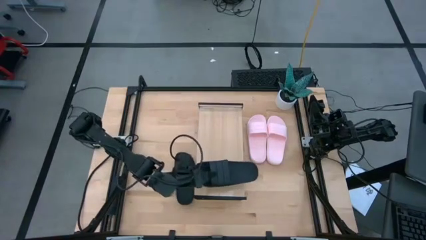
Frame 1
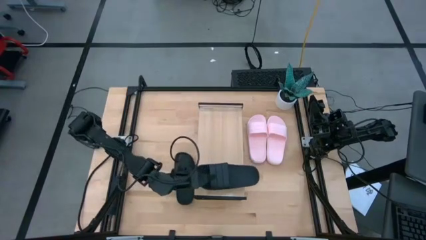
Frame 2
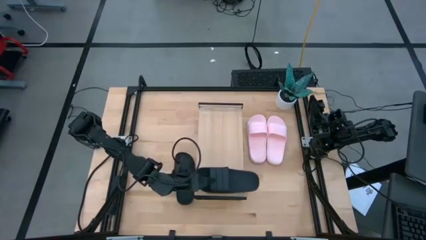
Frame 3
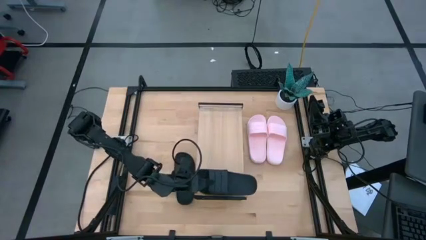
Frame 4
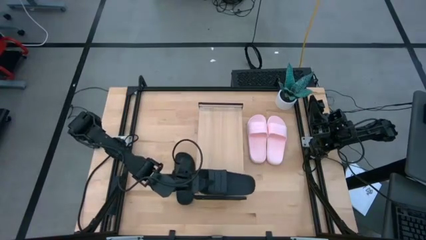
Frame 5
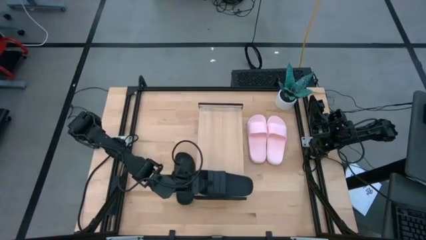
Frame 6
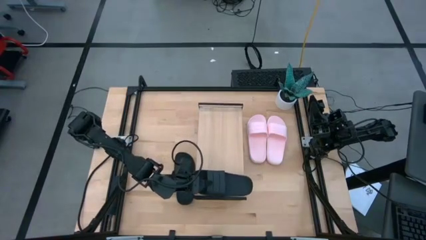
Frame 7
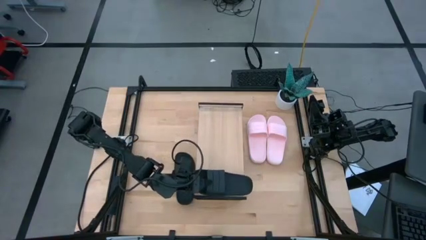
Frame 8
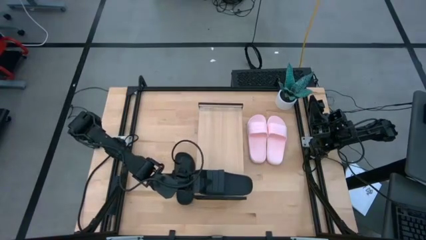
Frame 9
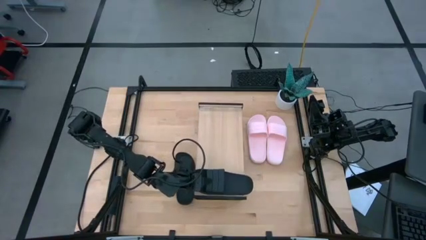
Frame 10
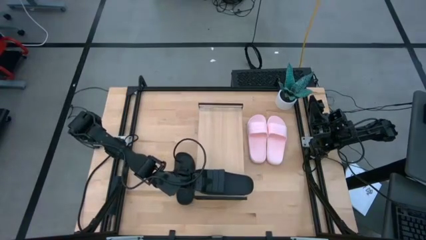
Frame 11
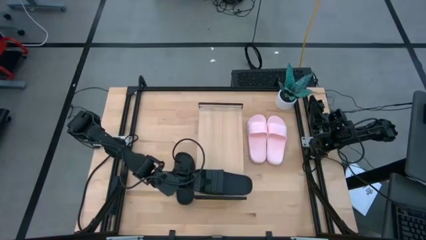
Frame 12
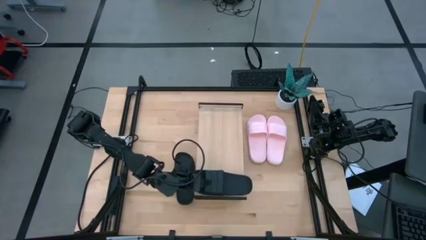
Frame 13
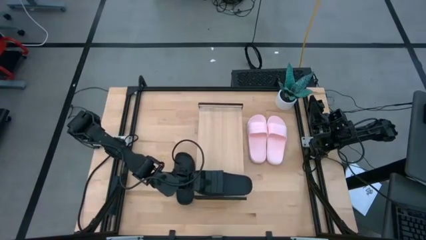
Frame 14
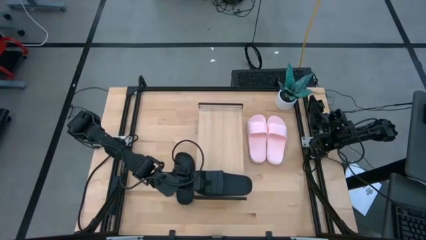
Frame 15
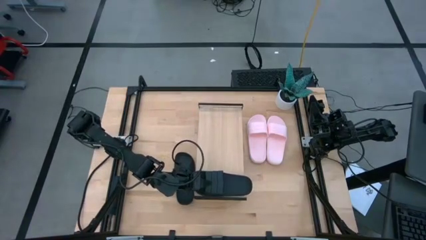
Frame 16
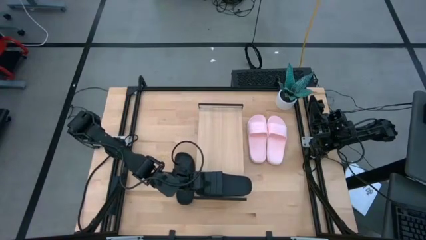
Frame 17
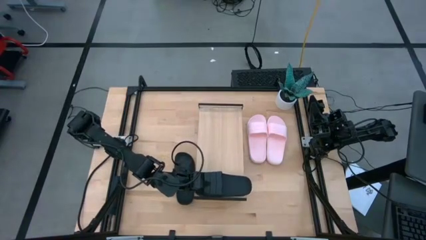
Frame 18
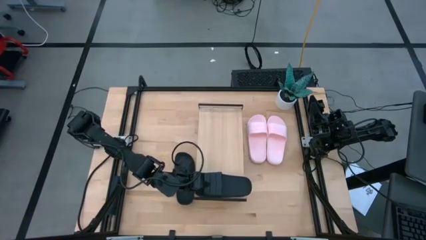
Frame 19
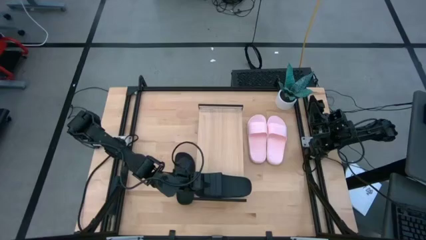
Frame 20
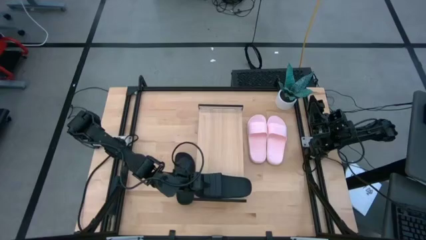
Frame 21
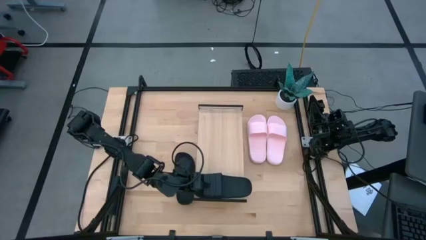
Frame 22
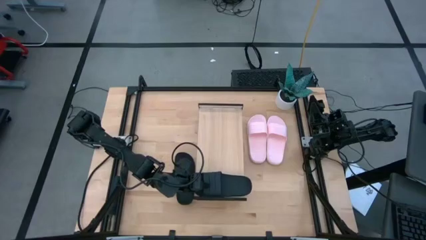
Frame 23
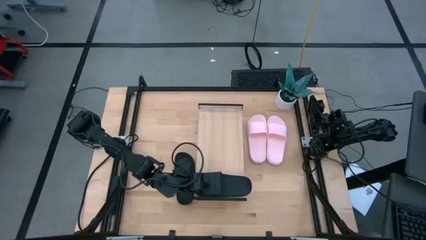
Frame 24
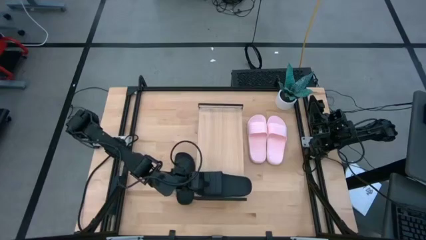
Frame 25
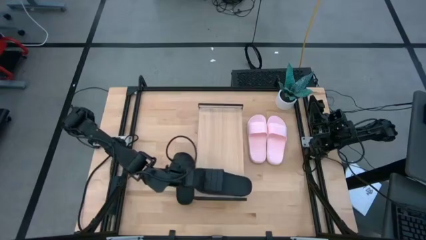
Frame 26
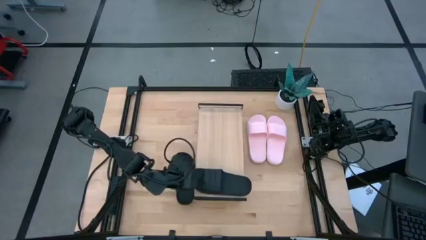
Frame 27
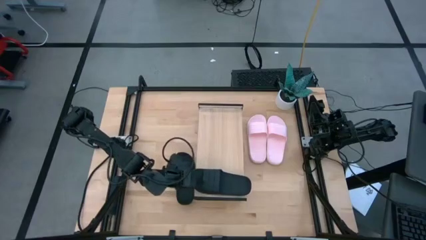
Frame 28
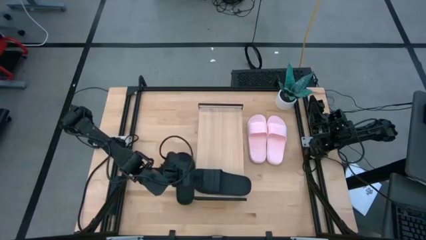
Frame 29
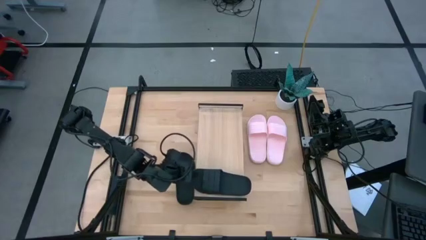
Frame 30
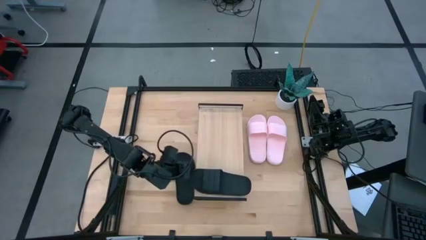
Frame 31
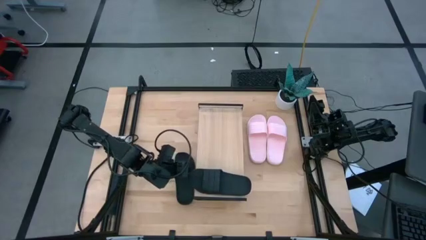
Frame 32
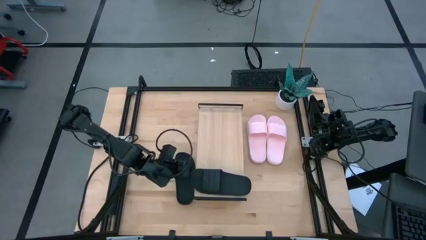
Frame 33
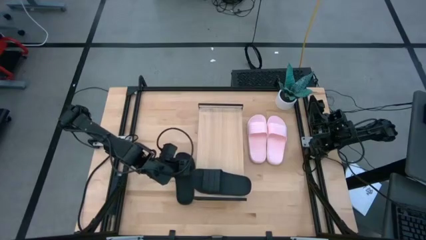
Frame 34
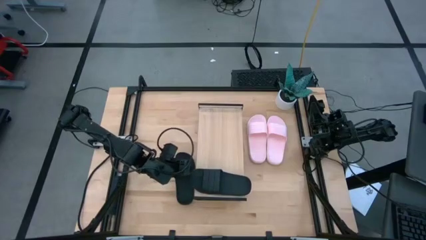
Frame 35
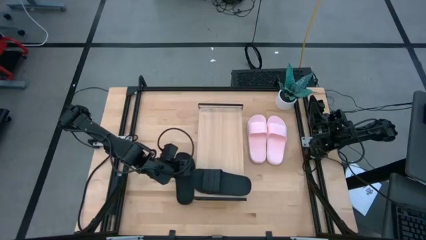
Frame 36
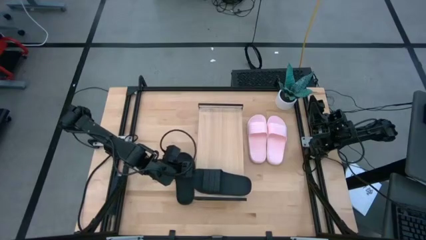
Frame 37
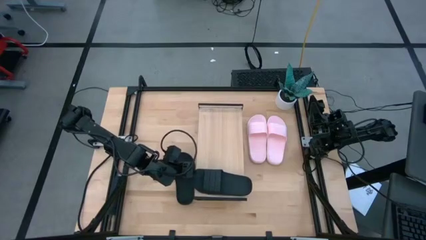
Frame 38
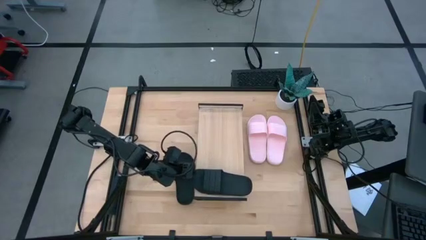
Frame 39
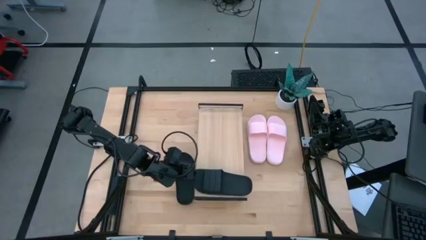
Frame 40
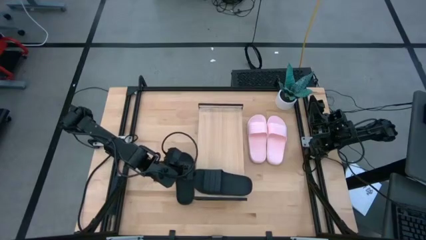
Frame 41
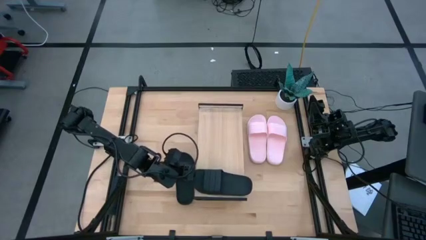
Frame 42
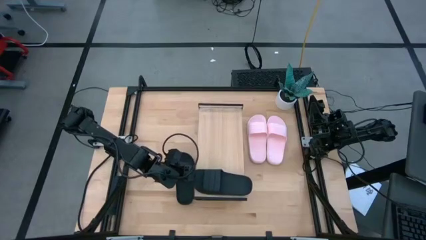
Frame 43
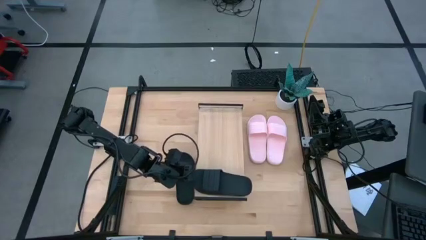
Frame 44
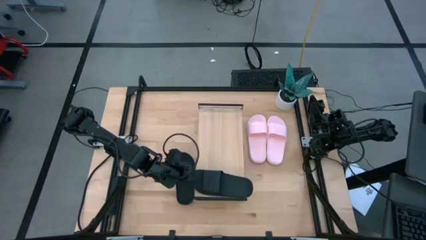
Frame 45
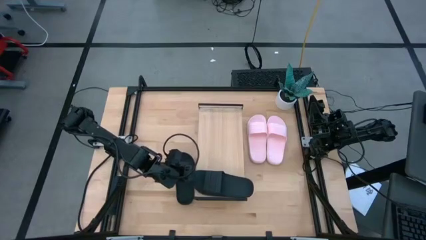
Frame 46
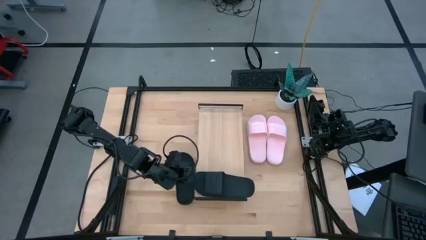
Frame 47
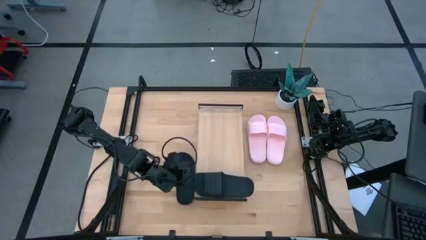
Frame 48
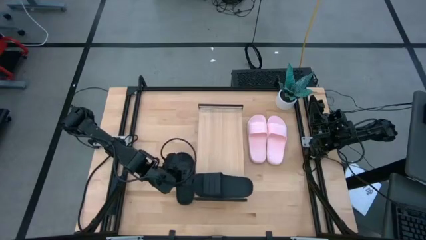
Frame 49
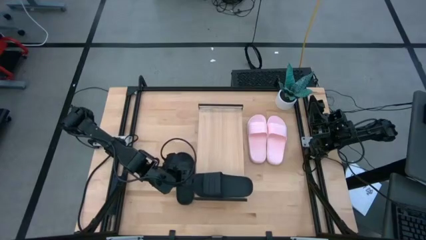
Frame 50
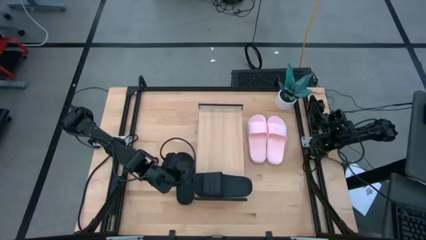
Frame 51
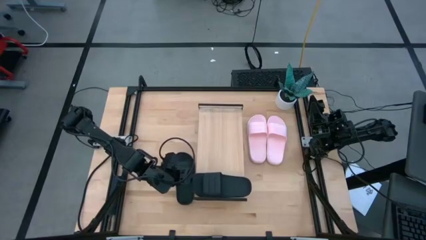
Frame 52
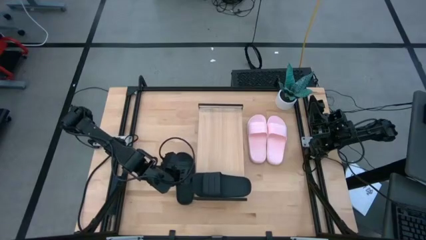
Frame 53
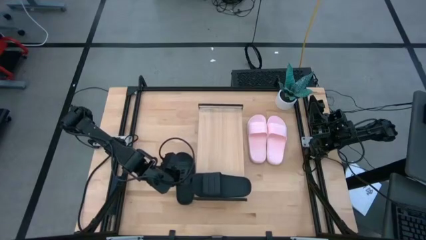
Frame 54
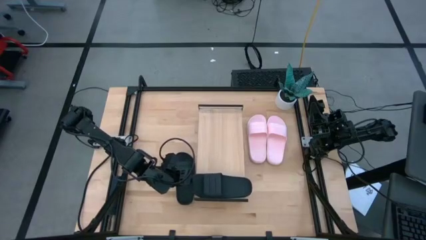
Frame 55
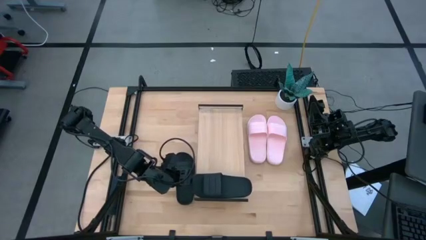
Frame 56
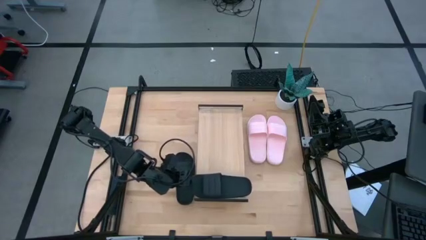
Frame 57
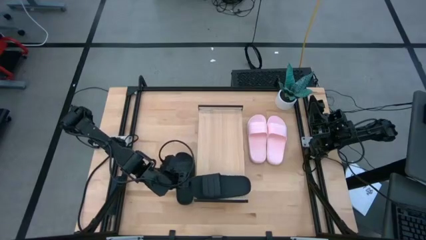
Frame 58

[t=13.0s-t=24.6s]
Task: Pick and place slides into the shelf
Put the left black slides on the shelf

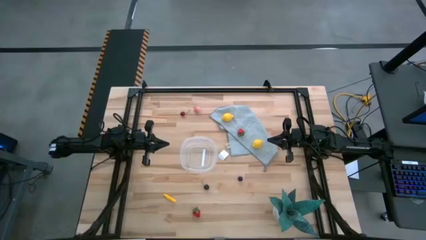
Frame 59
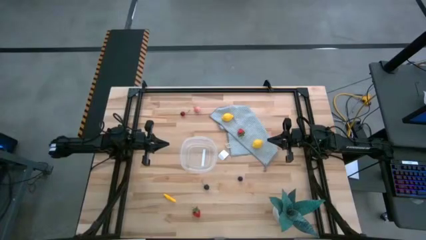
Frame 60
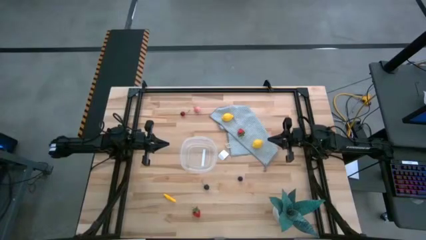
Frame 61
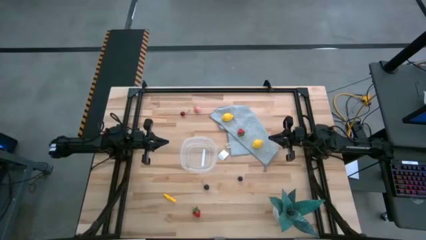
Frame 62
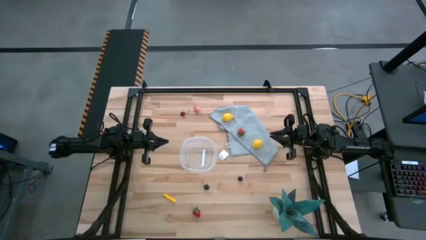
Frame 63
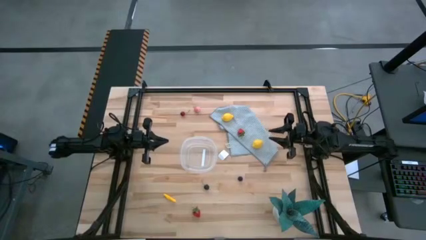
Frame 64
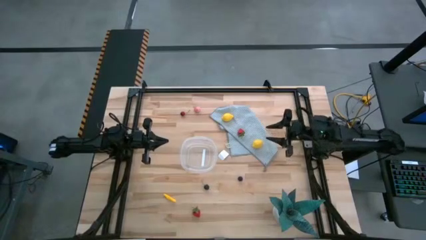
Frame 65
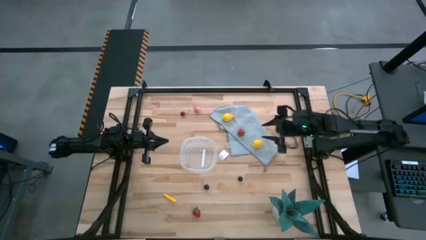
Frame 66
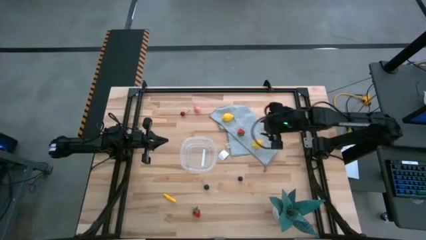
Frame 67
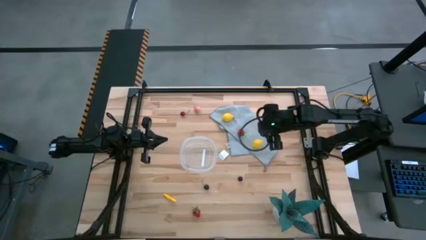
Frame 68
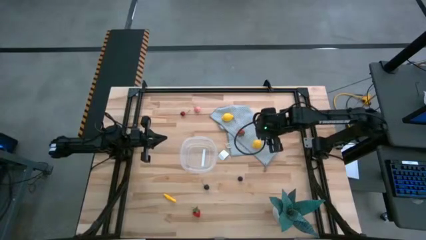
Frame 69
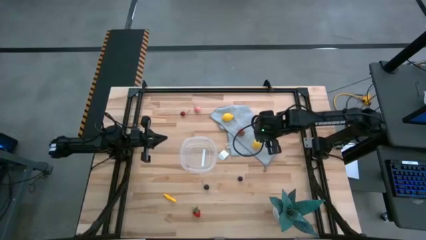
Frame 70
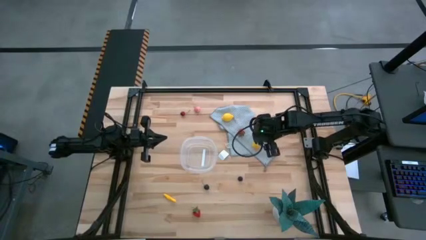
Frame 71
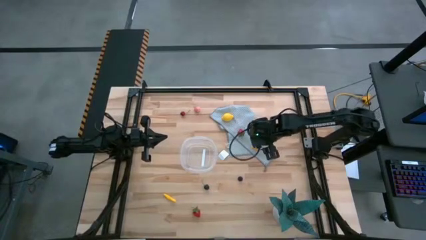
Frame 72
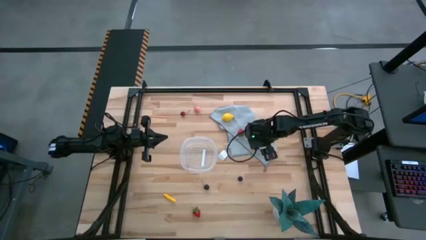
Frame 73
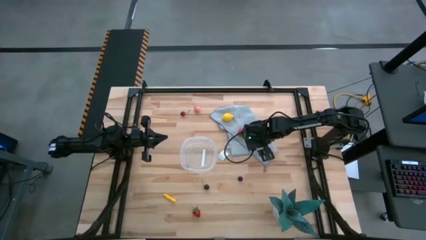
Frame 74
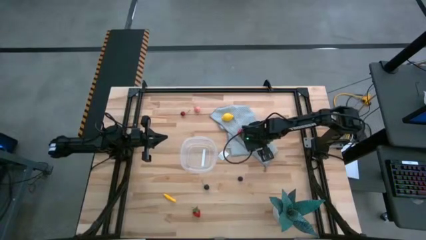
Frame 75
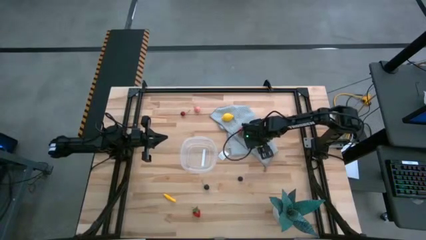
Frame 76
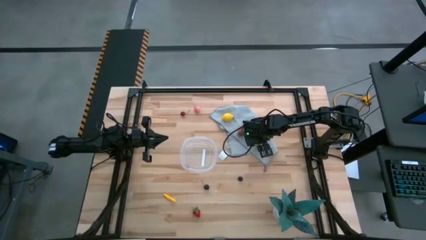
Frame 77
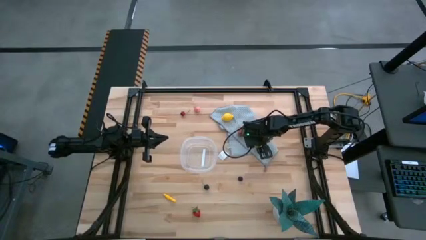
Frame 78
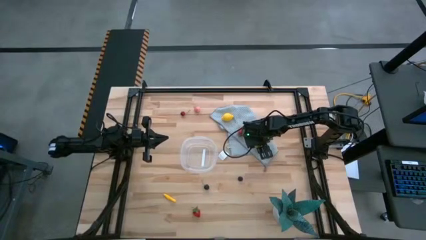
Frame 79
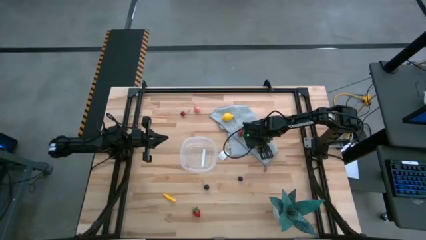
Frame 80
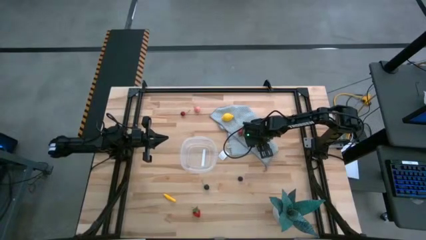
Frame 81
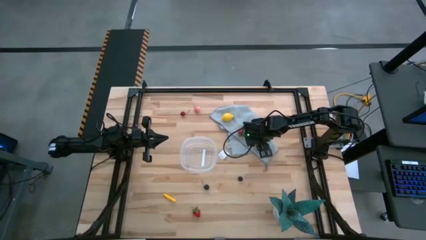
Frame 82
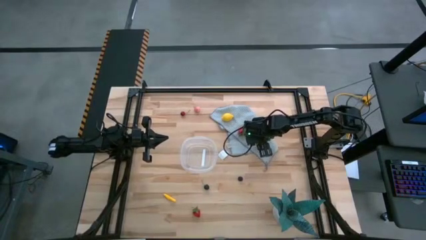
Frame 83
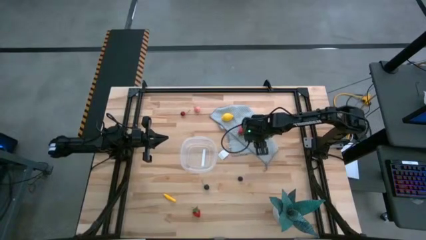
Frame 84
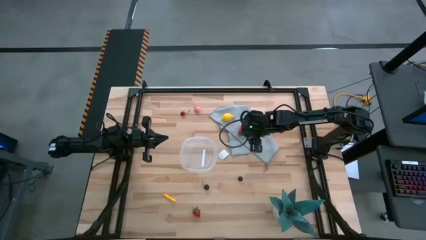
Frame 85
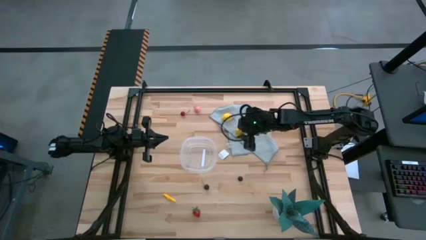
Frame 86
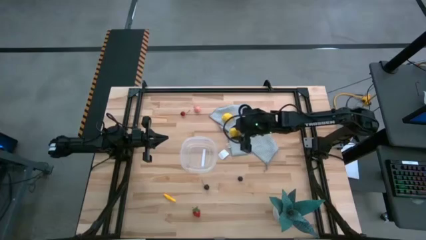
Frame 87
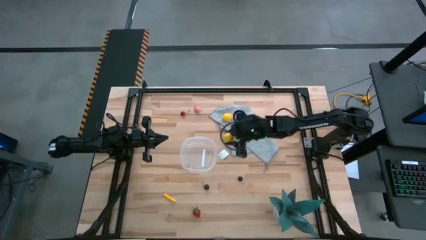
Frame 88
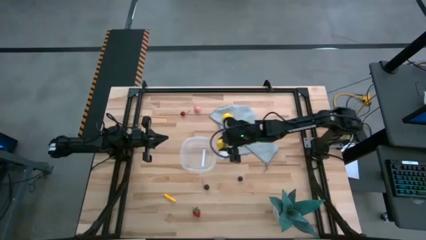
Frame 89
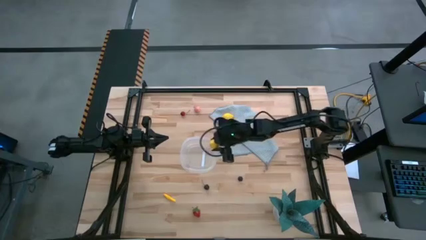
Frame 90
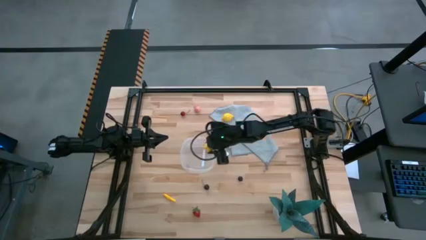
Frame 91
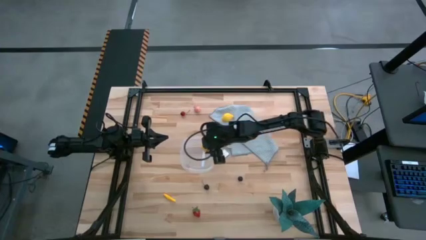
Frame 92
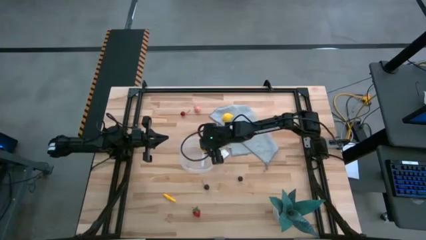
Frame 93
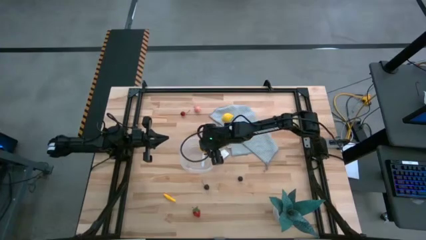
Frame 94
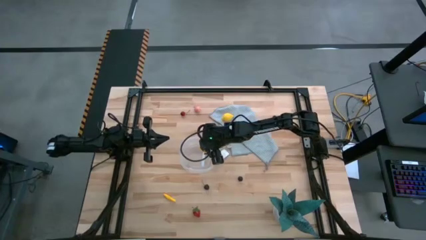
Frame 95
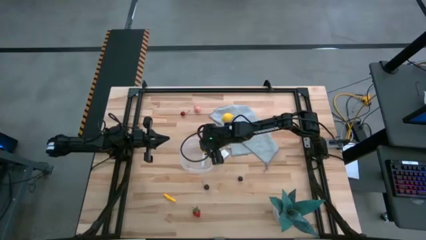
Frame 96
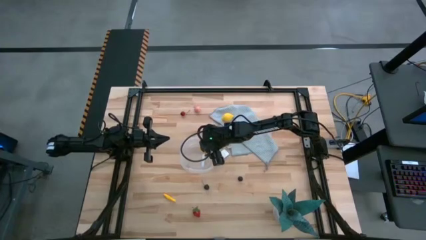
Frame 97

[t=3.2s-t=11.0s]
Task: Pick and placing Produce into tupperware
Put the bottom yellow lemon into the transparent bin
